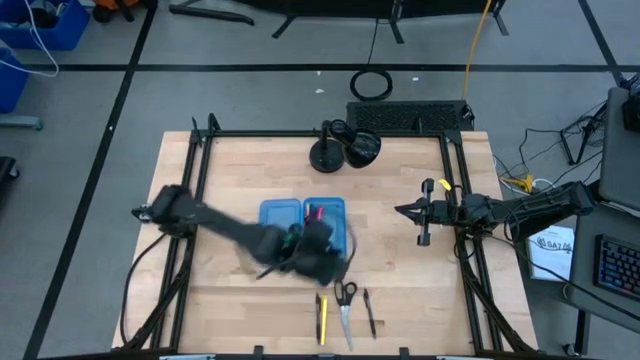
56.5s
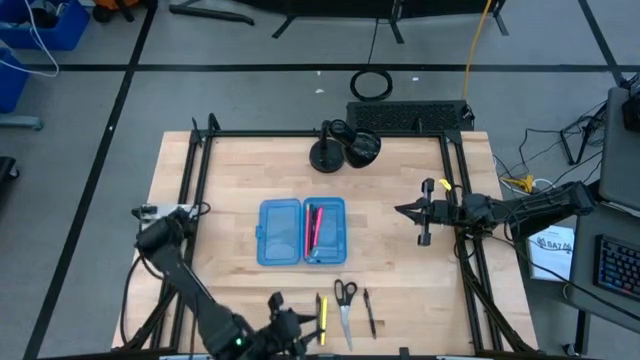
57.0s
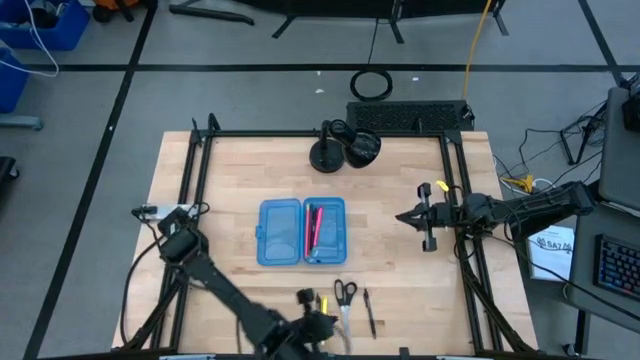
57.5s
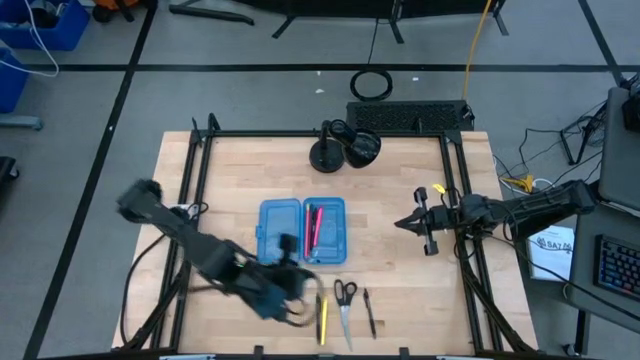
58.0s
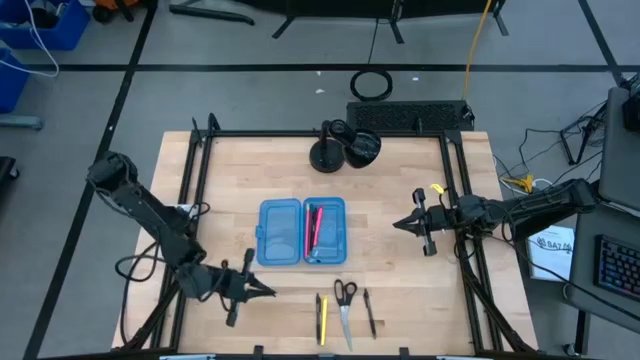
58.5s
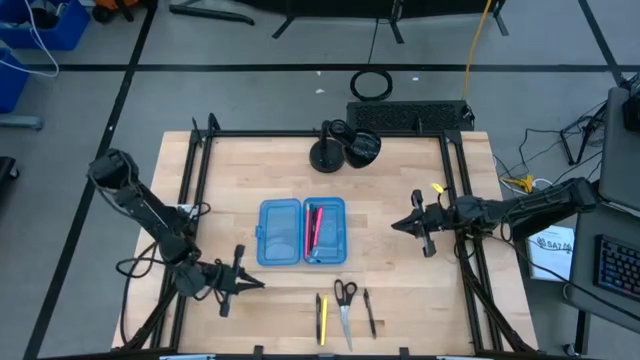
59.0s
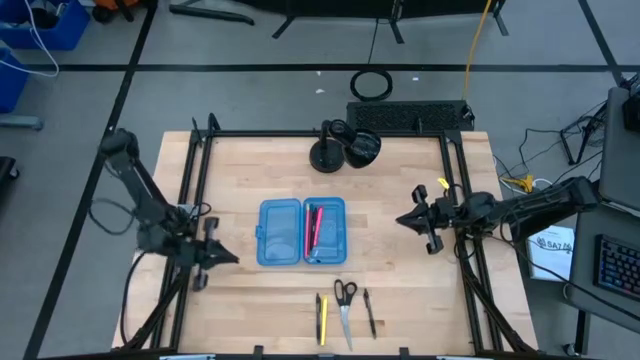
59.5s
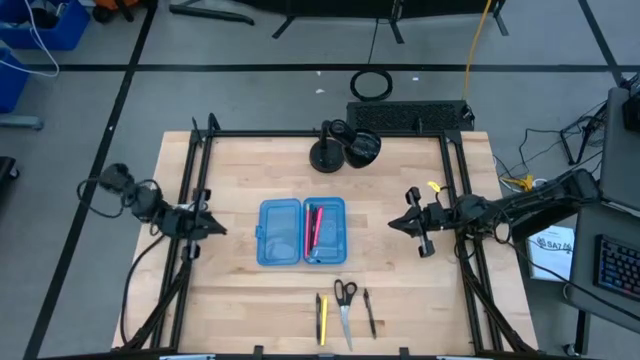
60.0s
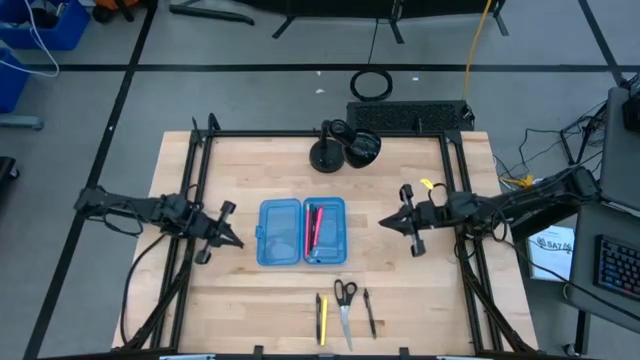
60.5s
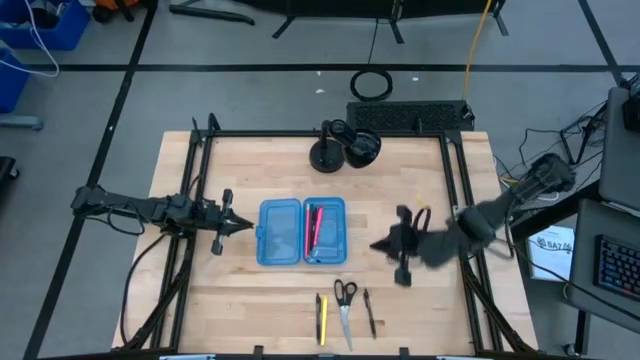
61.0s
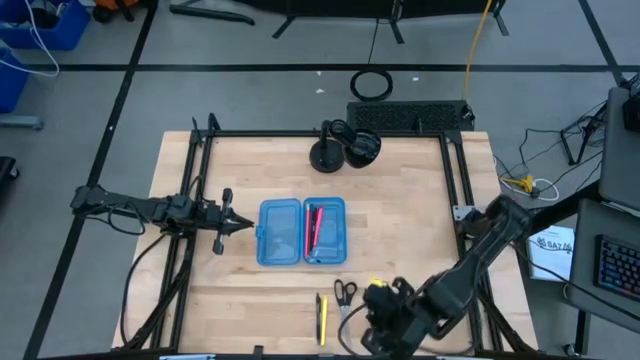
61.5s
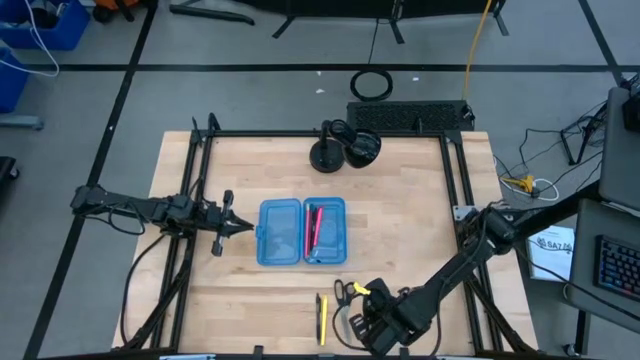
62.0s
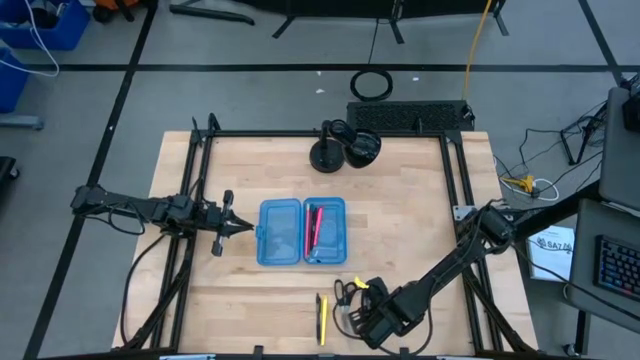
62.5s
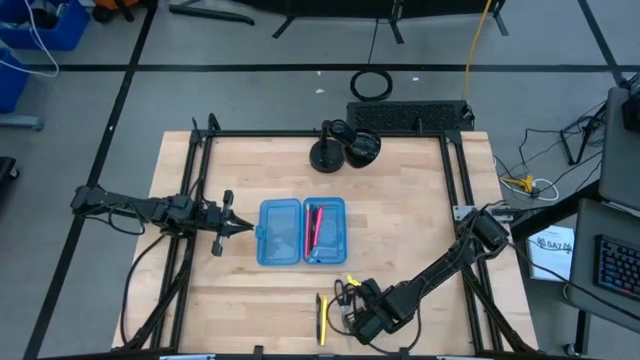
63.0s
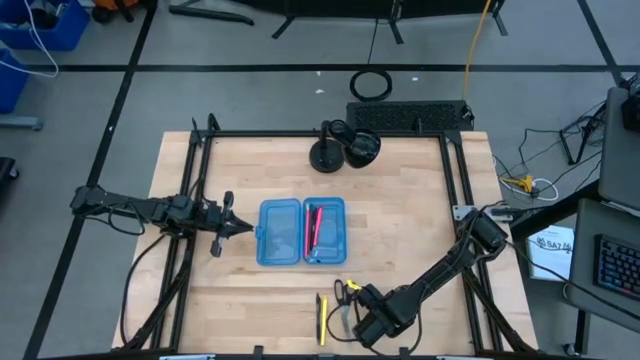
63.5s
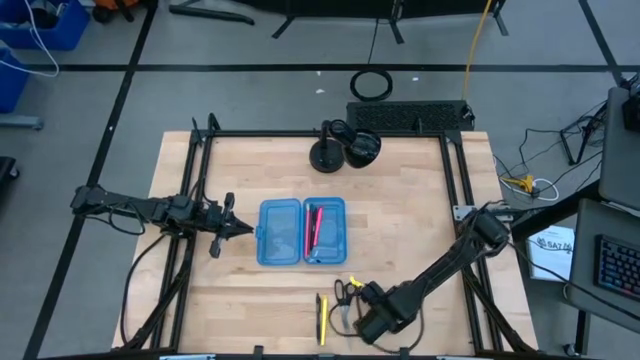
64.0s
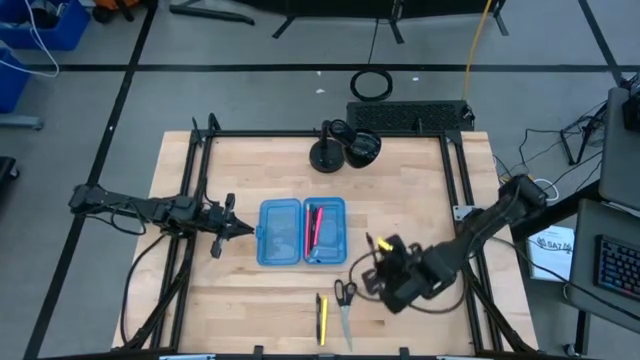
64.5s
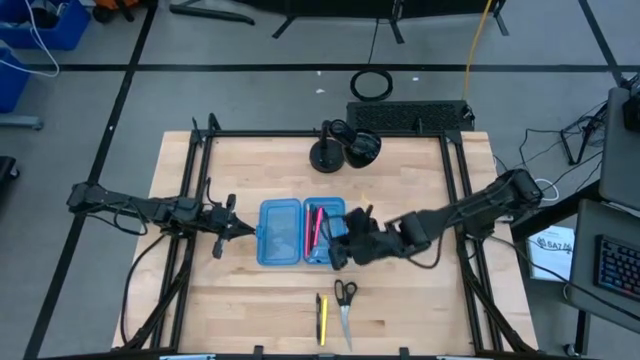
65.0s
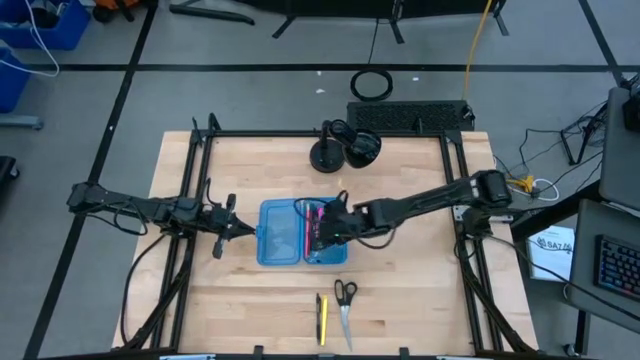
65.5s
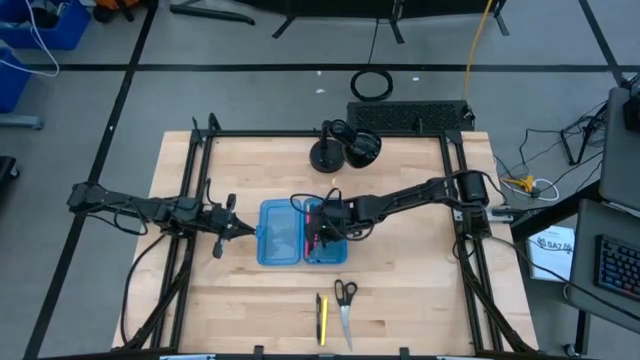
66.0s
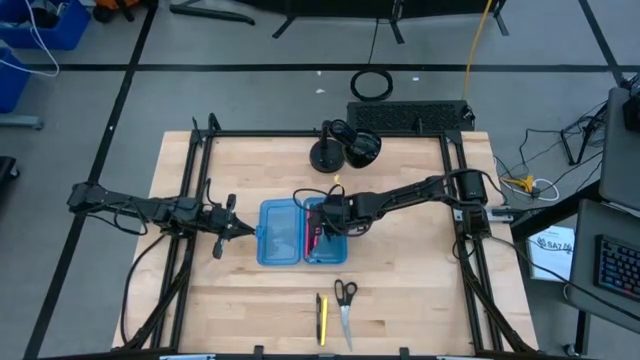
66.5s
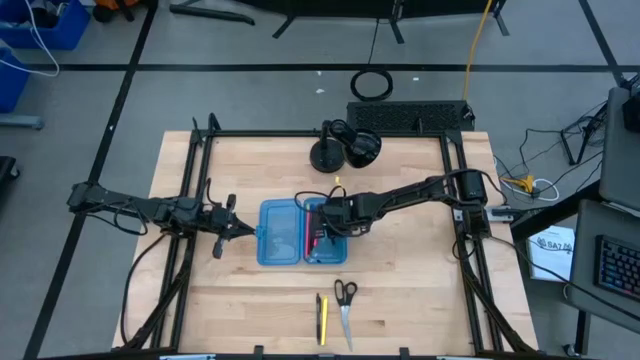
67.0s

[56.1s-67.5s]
Task: Pick & place school supplies into a supply box
Put the right black pen into the blue supply box

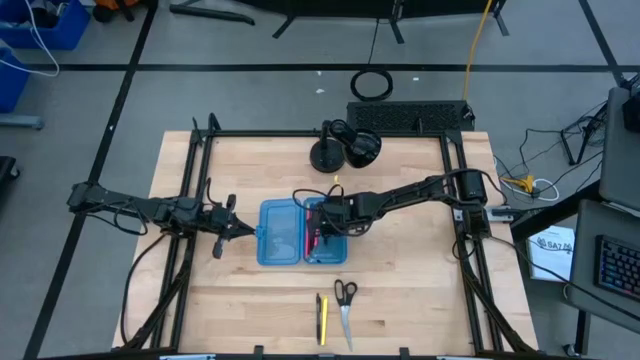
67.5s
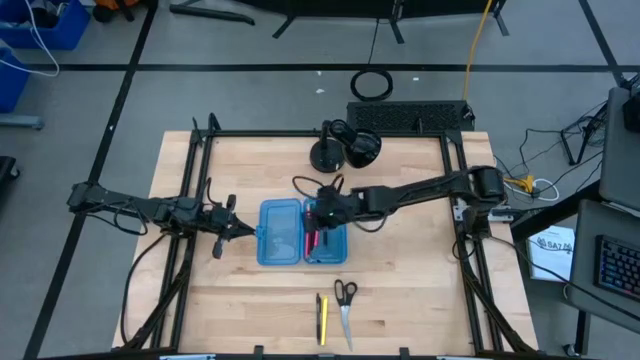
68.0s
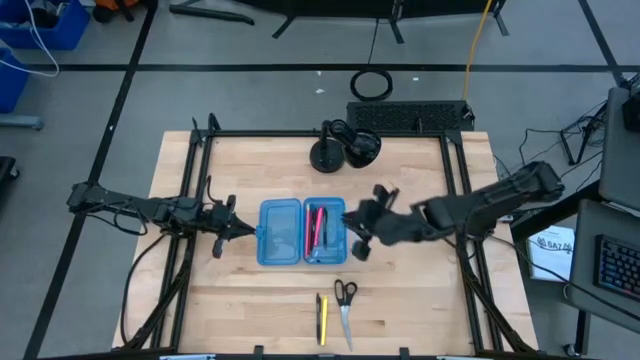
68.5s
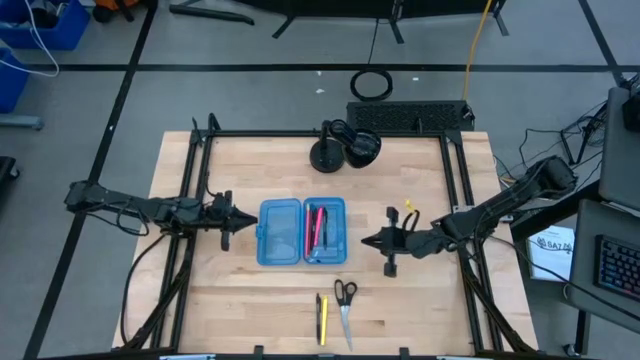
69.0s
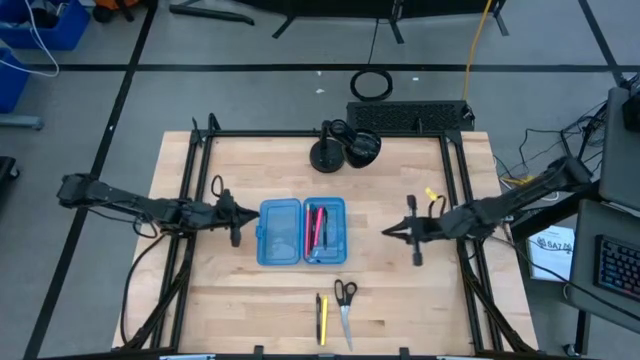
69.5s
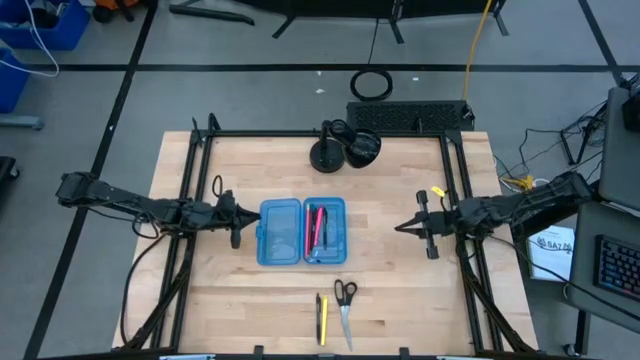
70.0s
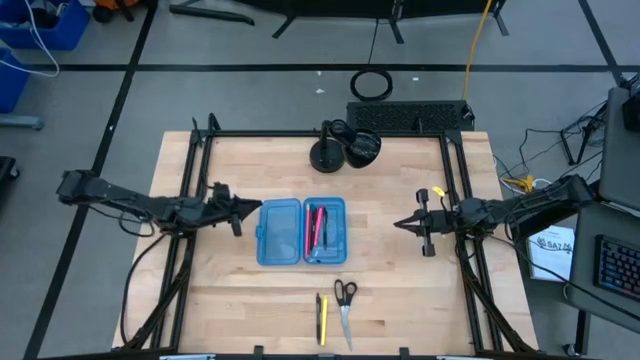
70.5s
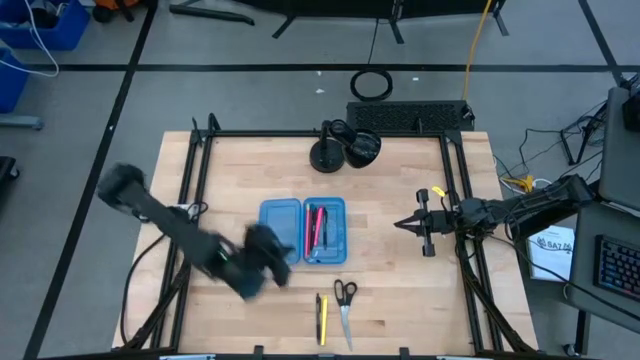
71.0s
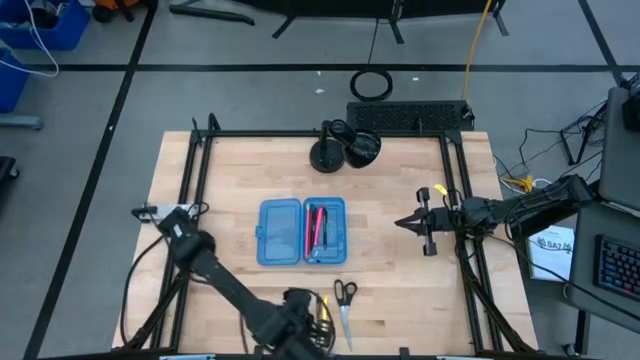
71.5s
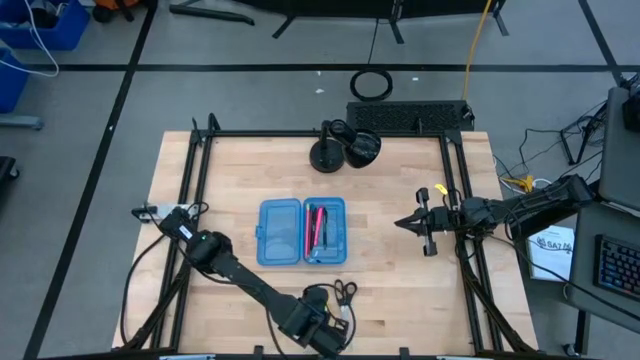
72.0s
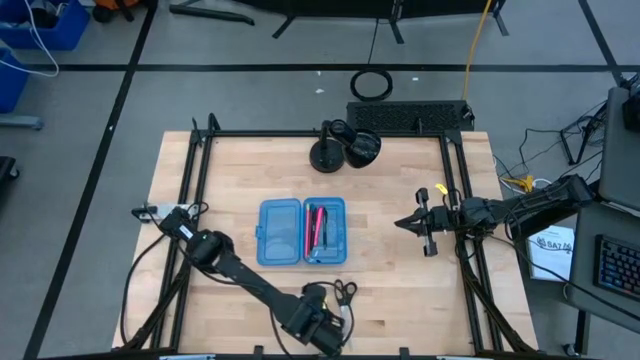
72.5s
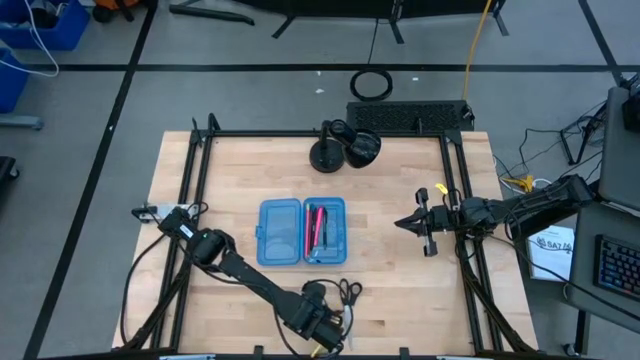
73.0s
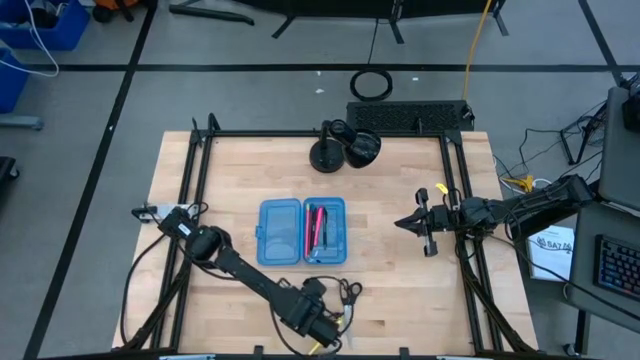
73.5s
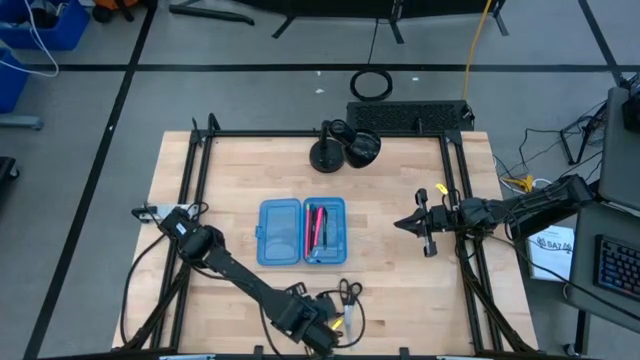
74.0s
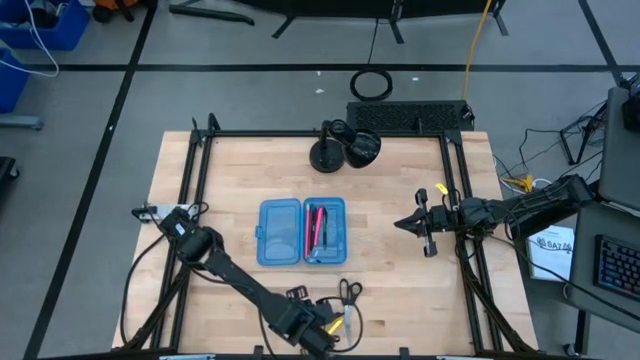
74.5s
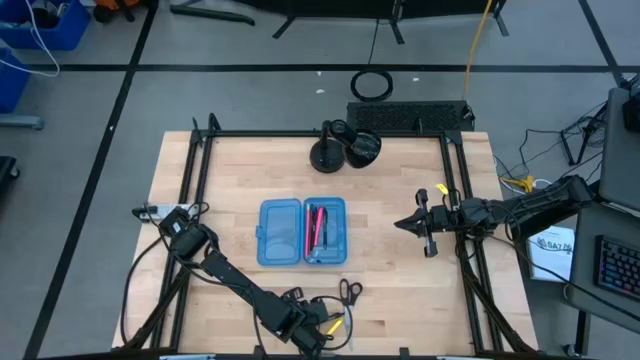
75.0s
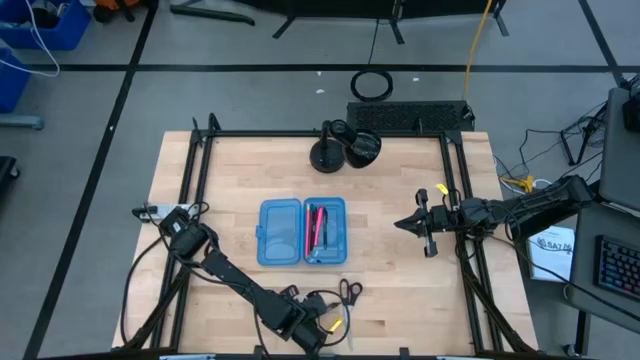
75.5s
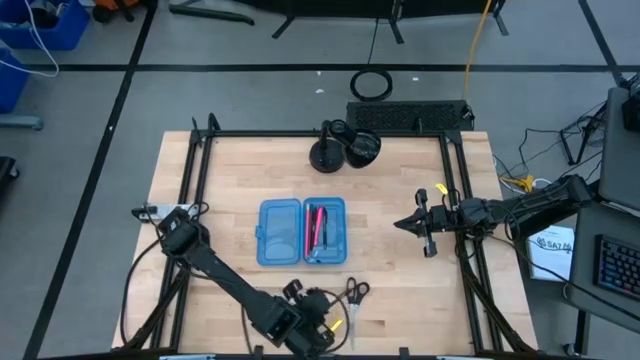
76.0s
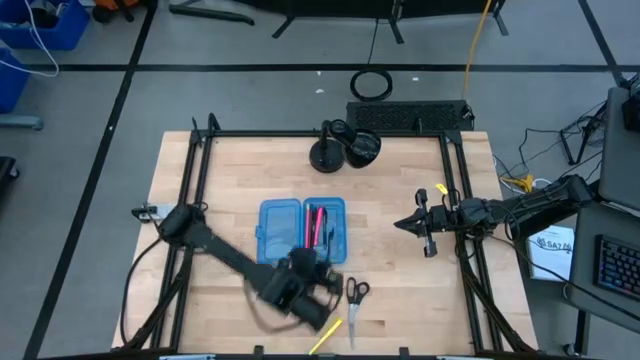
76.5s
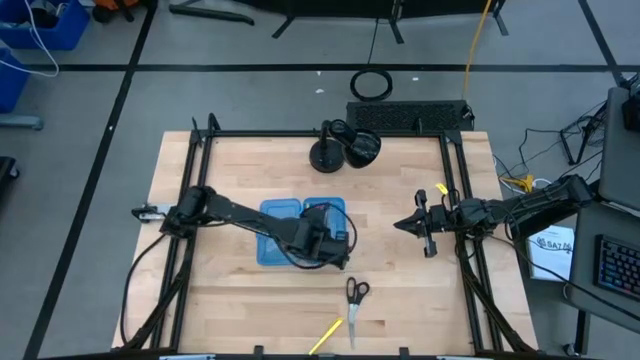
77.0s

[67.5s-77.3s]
Put the black pen into the blue supply box
